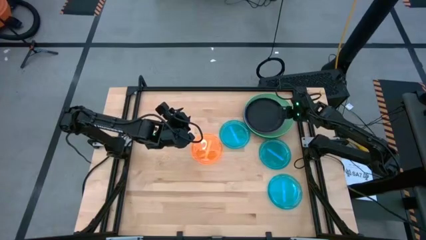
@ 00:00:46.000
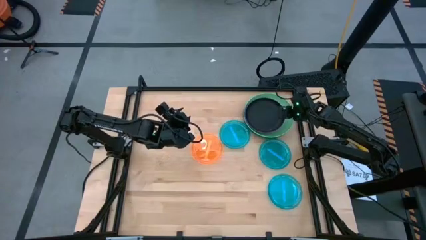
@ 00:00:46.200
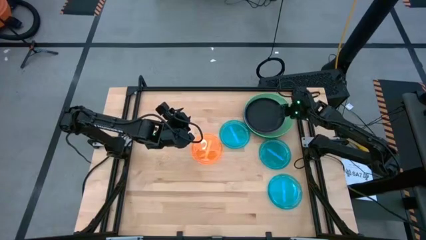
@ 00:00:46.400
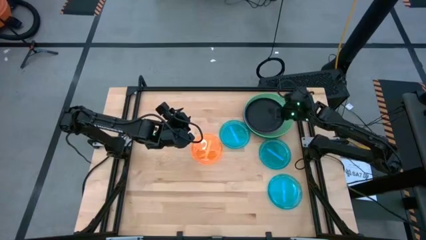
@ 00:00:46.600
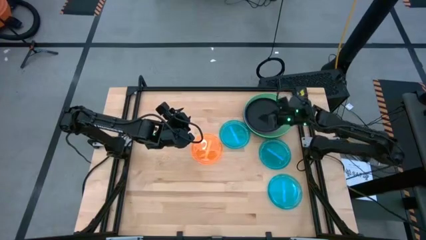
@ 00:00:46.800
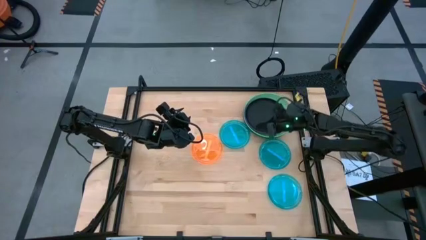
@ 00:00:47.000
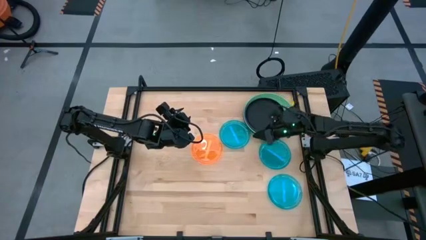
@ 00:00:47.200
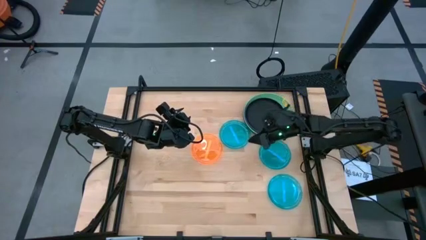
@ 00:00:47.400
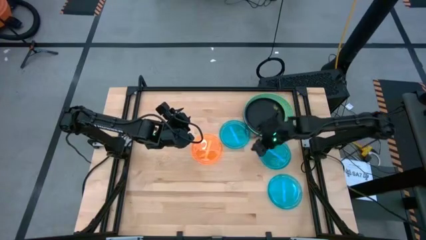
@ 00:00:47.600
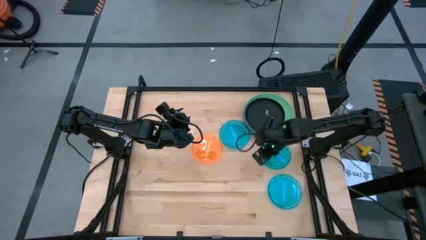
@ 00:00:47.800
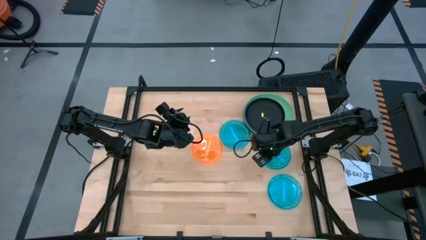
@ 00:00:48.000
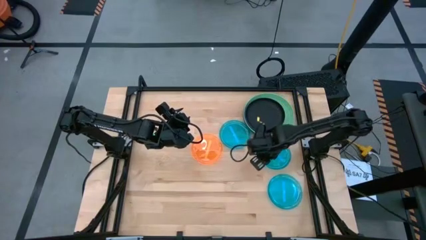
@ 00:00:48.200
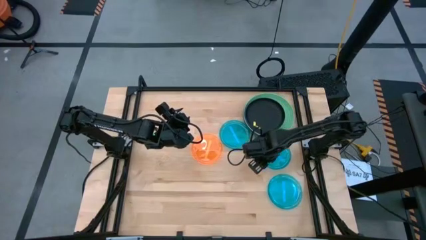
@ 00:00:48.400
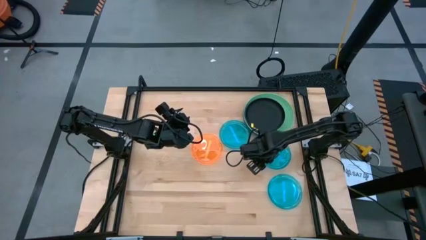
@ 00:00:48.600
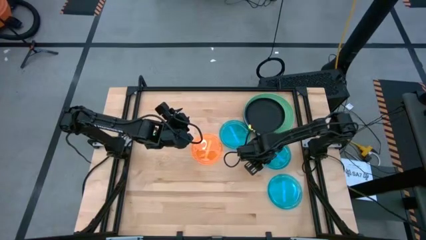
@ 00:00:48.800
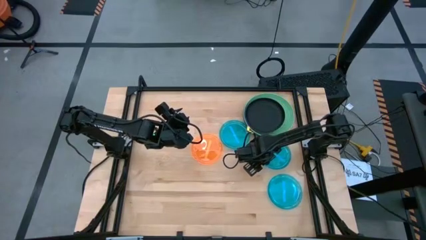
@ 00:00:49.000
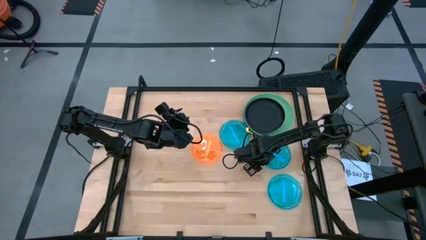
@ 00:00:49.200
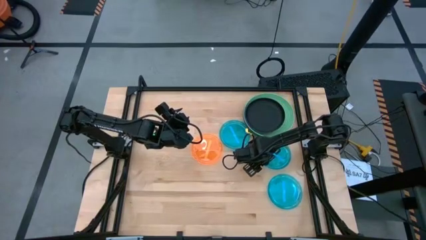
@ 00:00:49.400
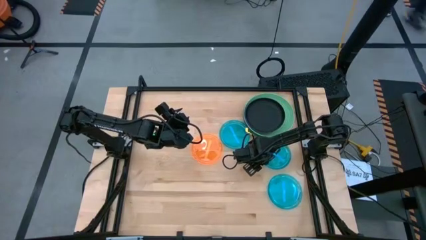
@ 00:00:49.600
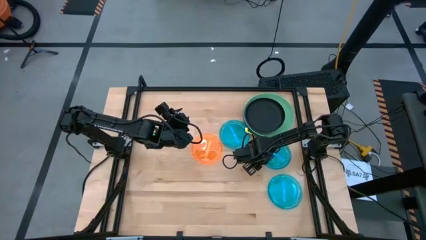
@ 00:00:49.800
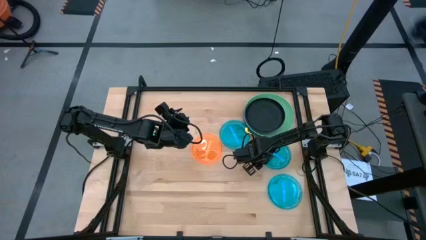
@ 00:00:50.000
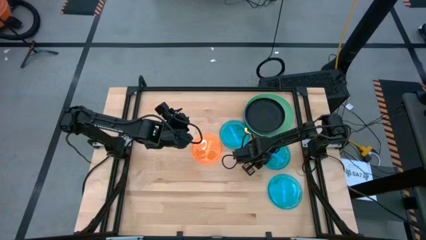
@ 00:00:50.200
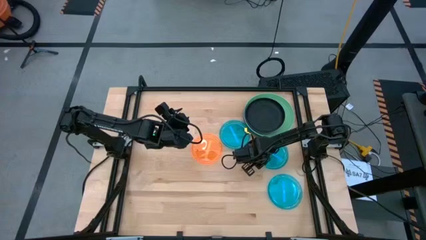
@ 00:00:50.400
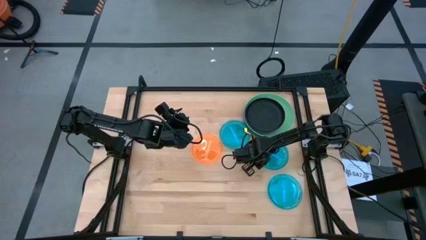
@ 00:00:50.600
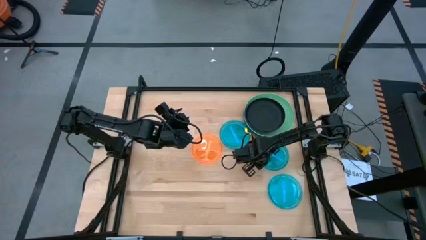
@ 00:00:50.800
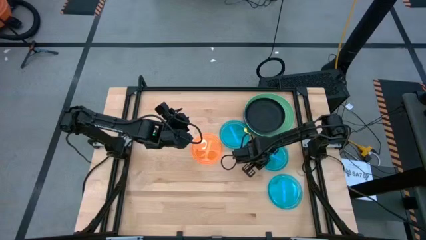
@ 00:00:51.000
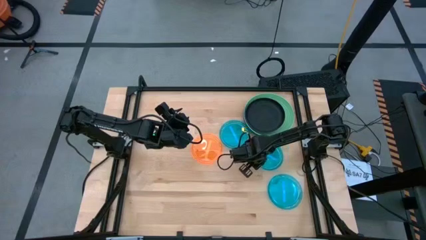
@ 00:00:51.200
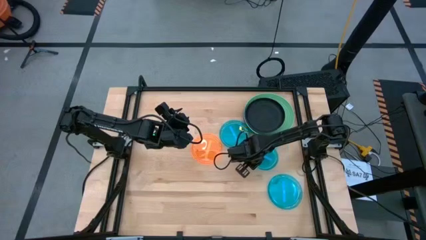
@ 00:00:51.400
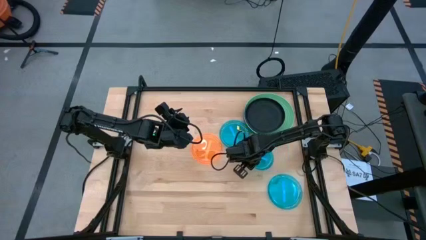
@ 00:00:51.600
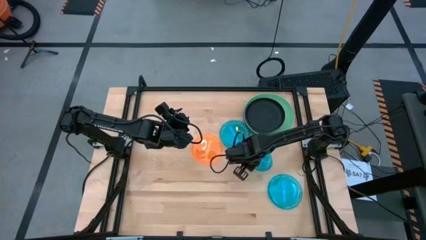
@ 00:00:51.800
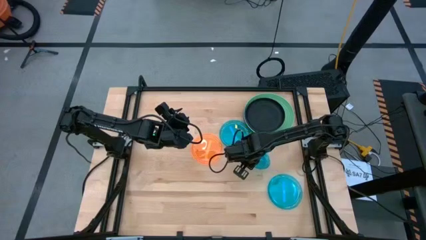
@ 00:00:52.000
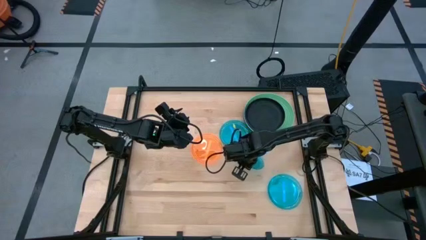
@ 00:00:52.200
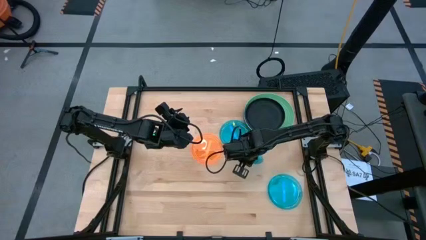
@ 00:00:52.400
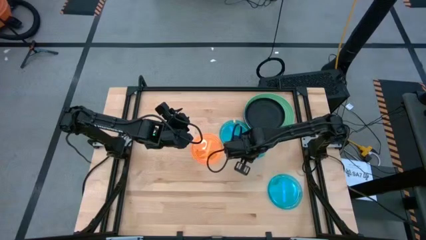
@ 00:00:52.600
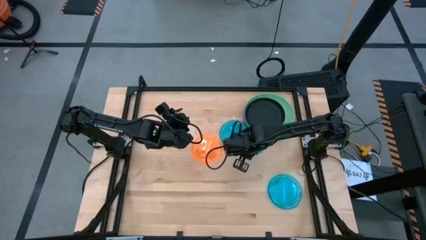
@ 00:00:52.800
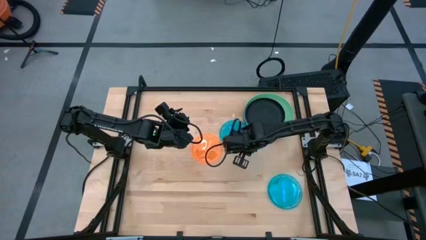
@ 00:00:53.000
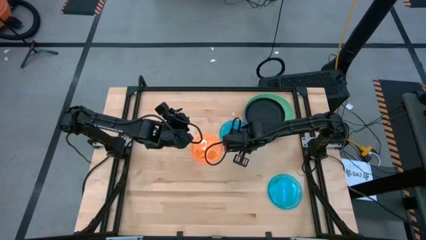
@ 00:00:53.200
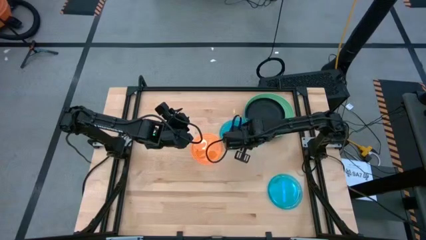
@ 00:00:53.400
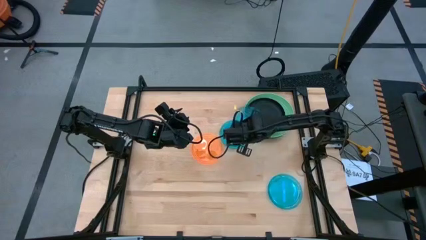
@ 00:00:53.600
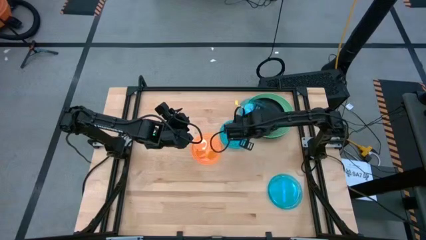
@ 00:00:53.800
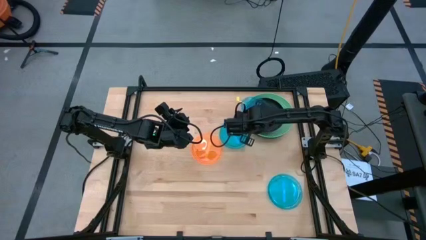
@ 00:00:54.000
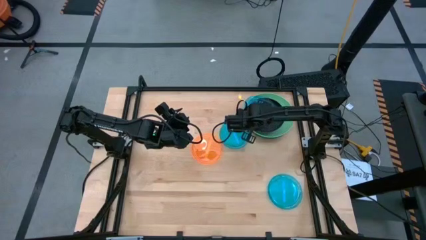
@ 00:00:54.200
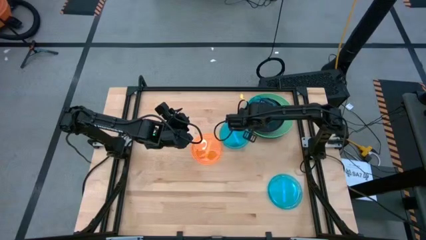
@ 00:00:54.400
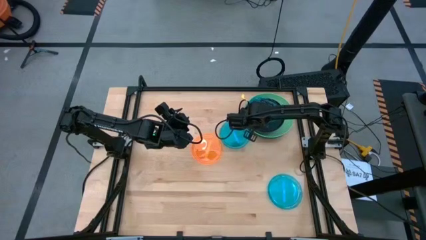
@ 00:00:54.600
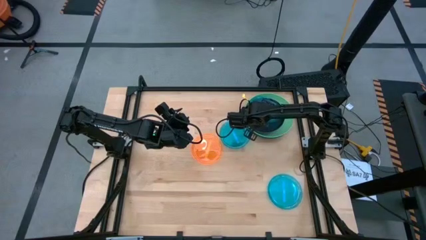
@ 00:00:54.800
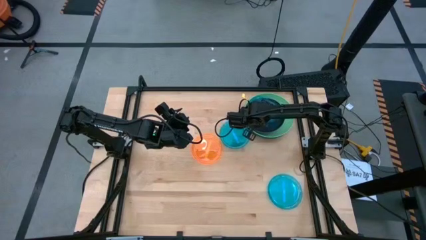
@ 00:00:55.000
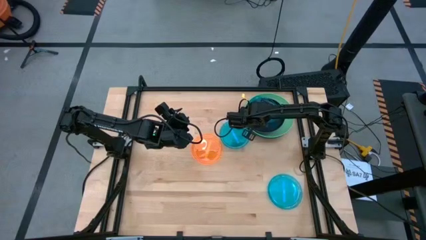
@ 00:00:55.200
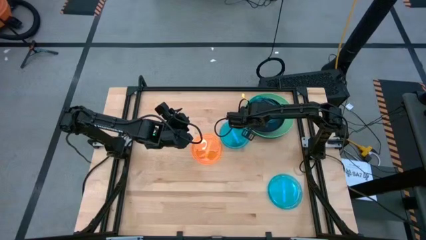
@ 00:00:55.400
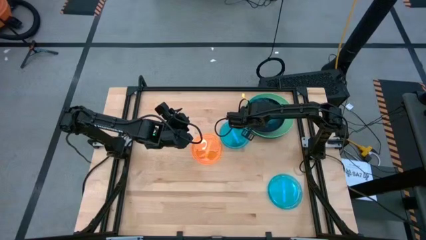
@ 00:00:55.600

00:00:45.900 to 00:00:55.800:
Task: Stack plastic plates
Stack the middle transparent blue plate on the black plate
